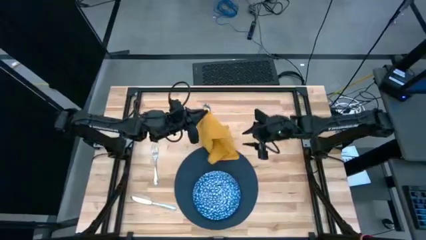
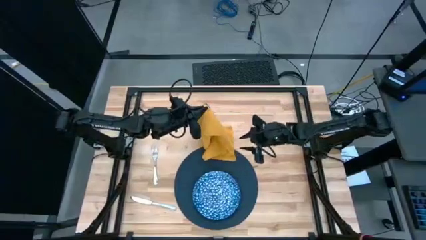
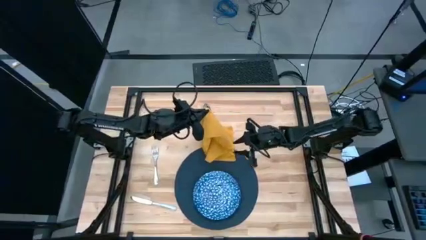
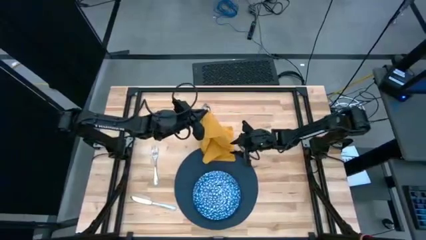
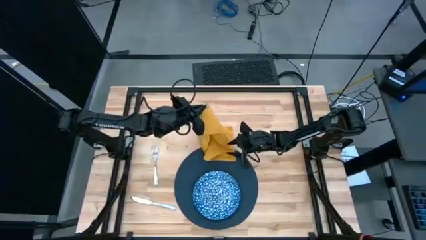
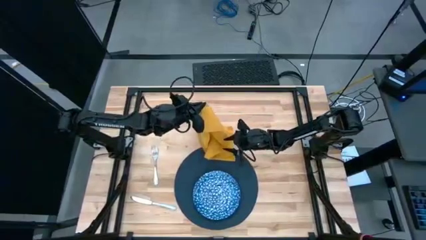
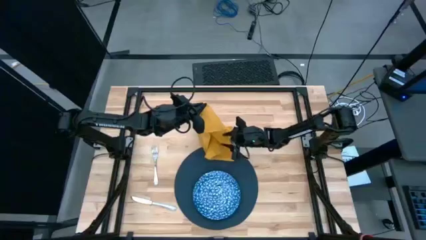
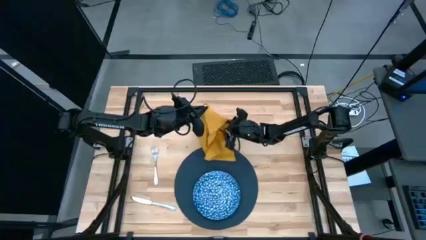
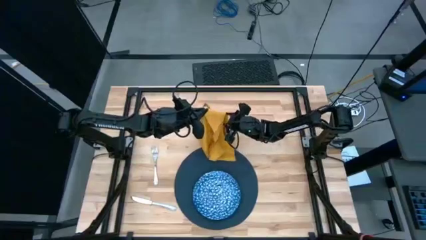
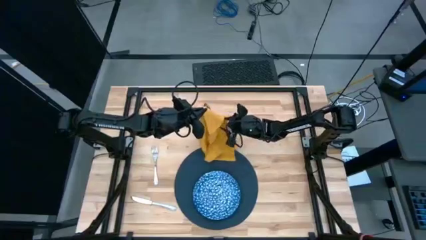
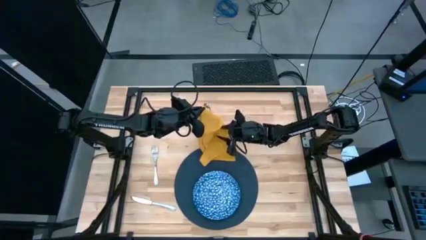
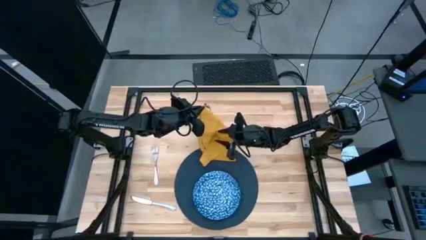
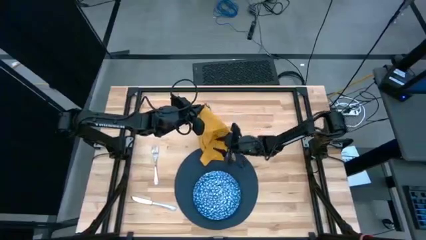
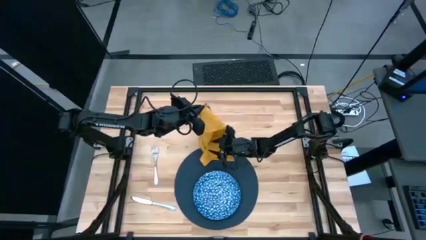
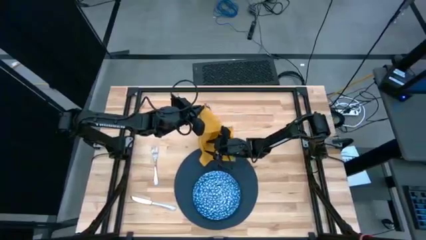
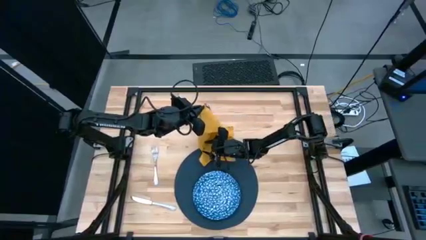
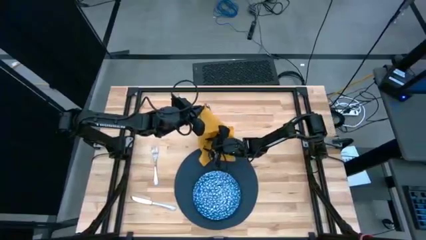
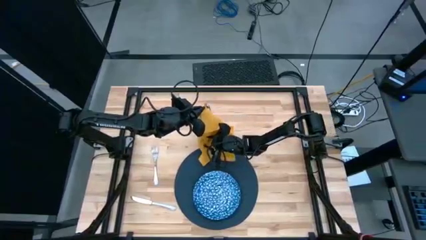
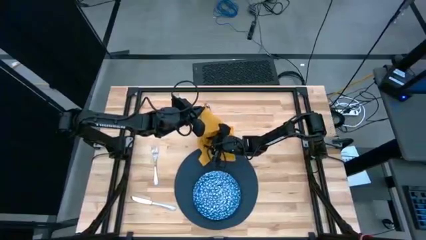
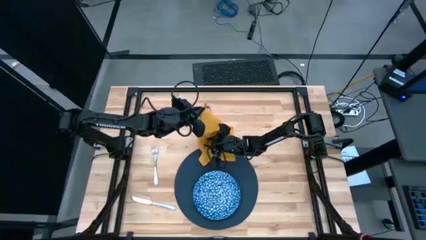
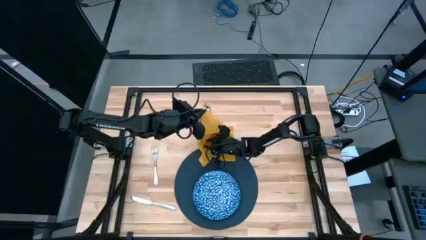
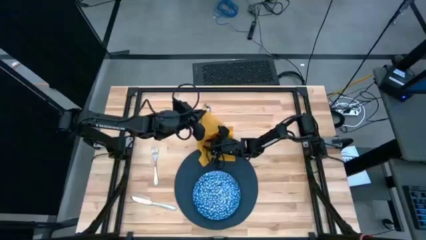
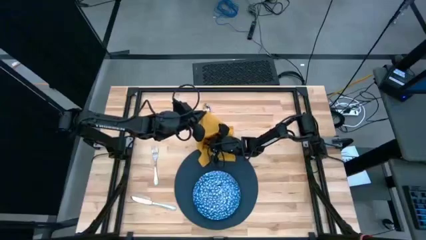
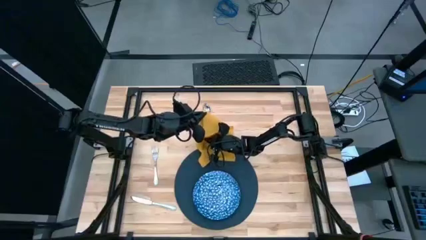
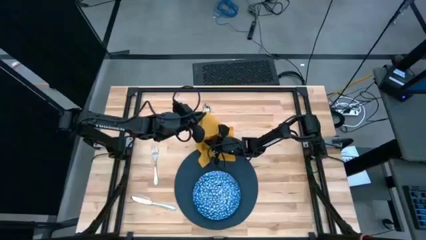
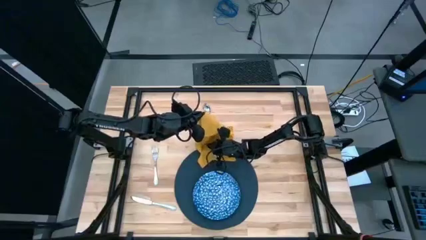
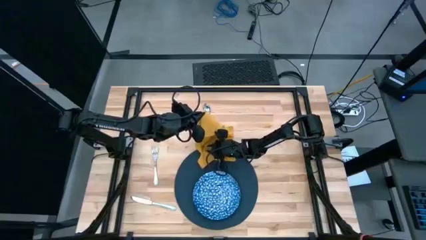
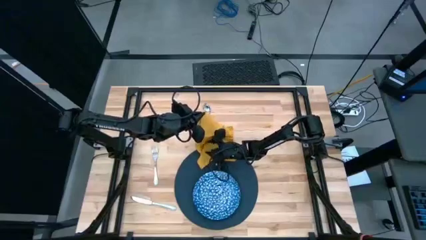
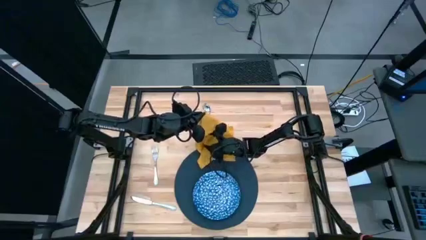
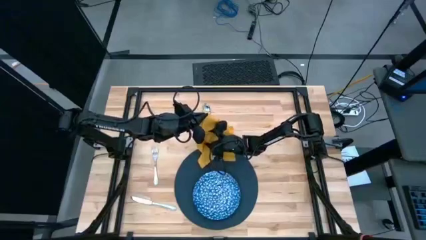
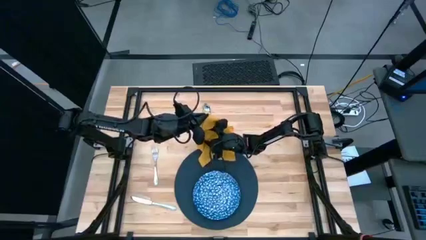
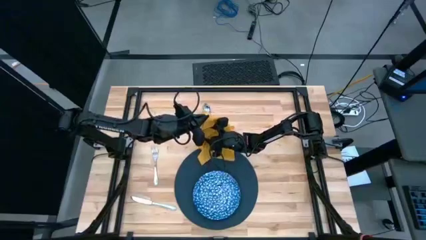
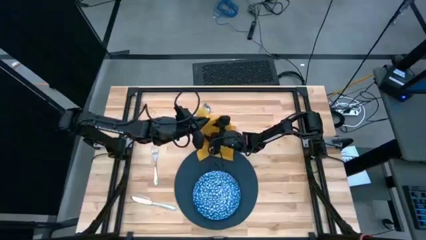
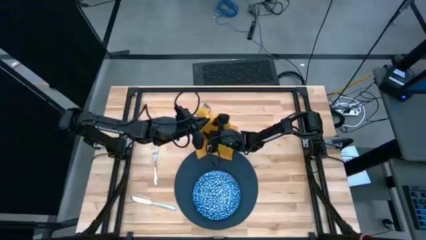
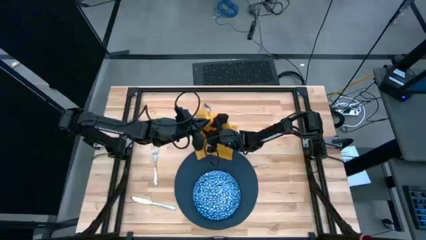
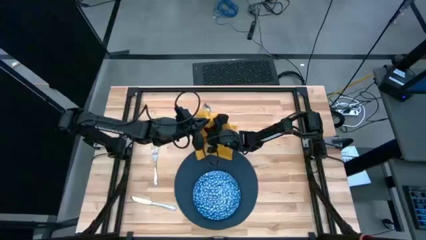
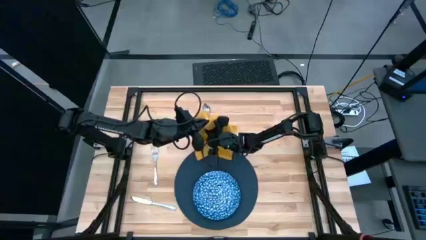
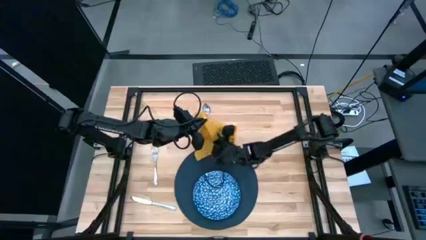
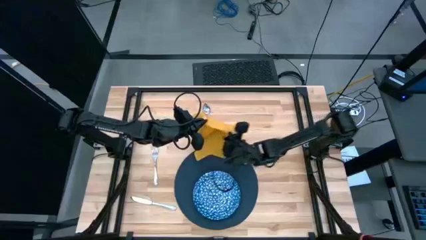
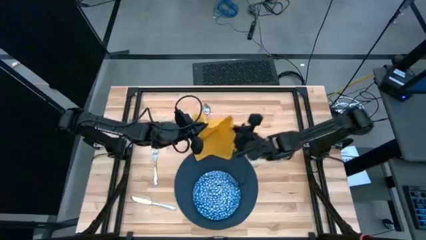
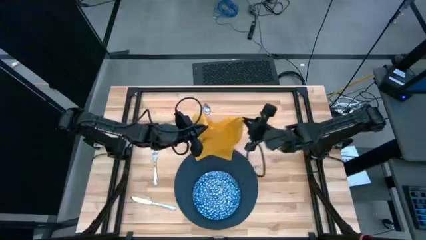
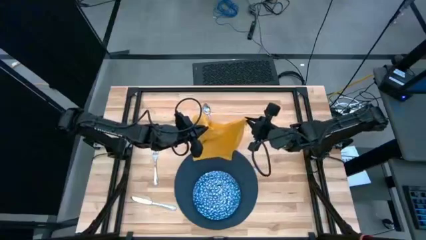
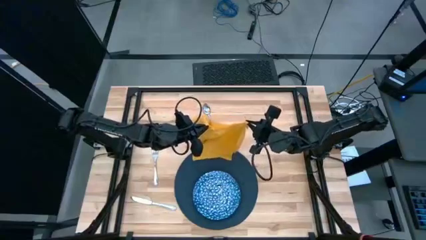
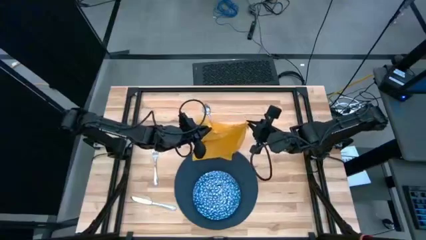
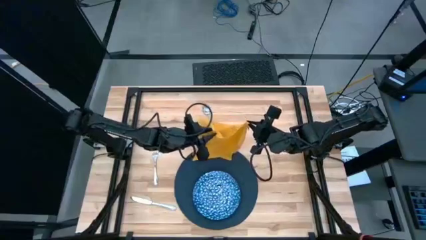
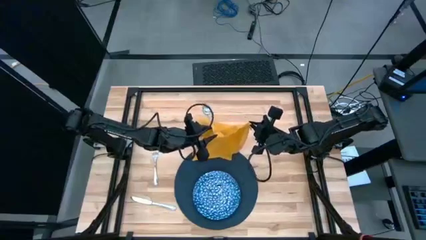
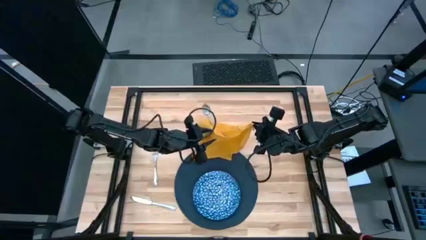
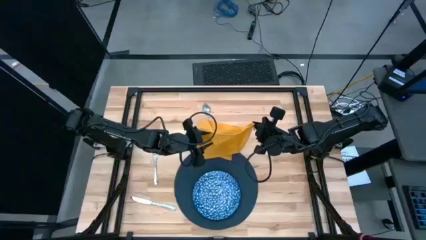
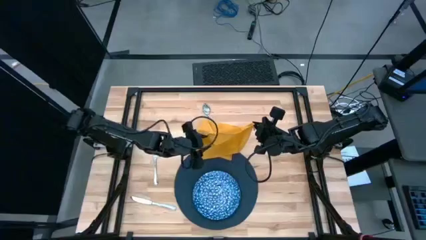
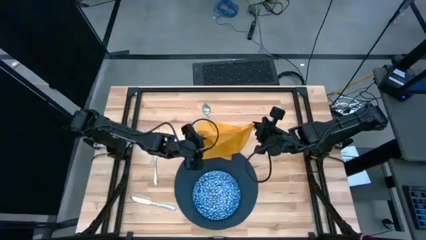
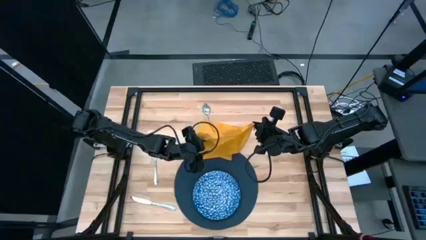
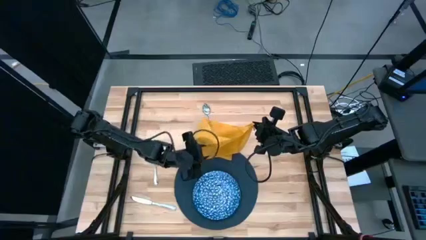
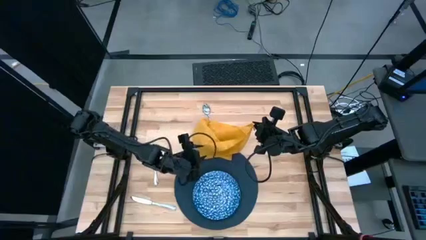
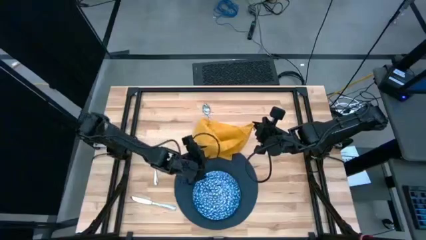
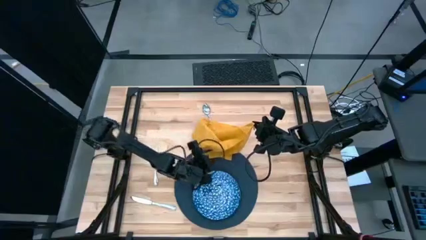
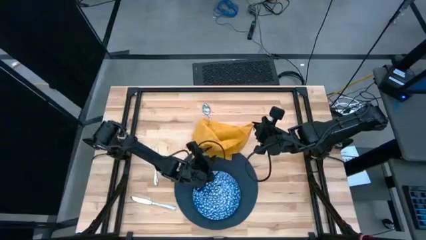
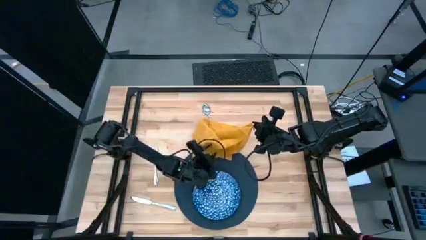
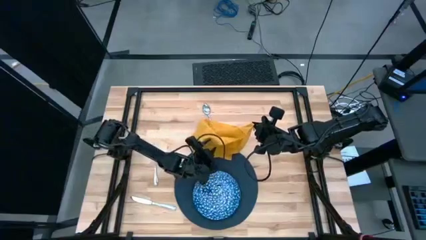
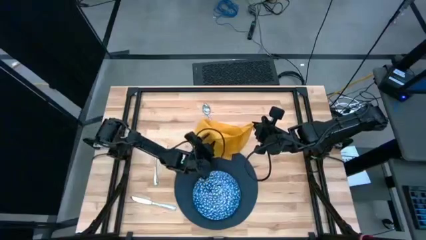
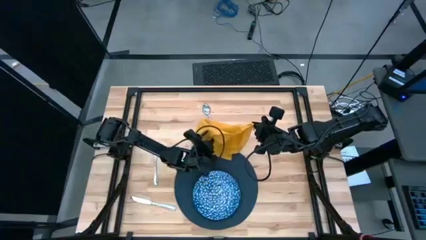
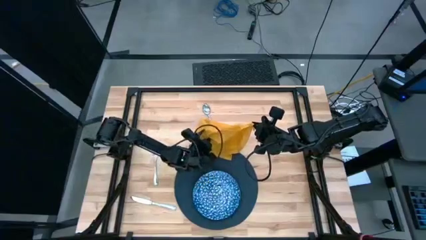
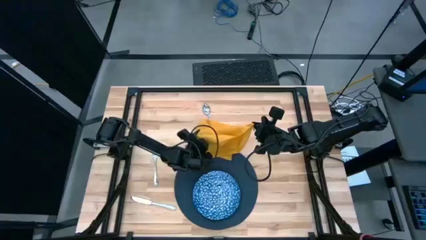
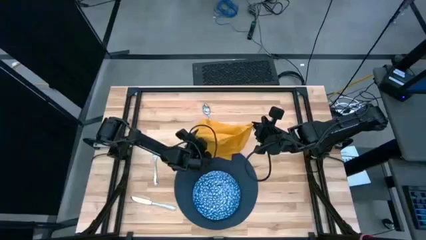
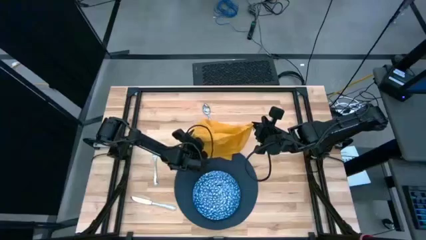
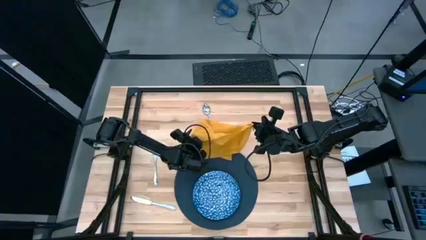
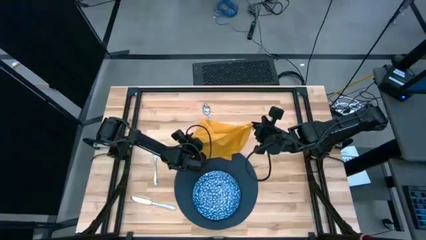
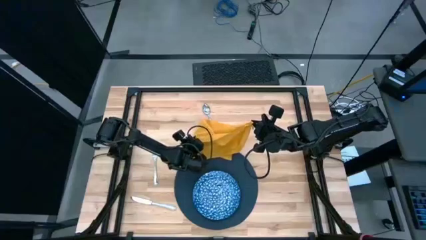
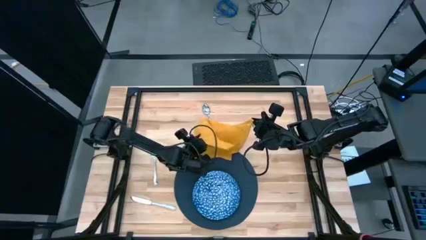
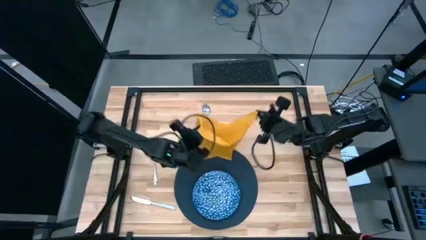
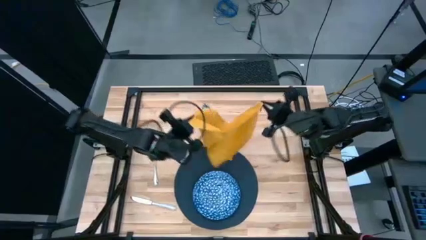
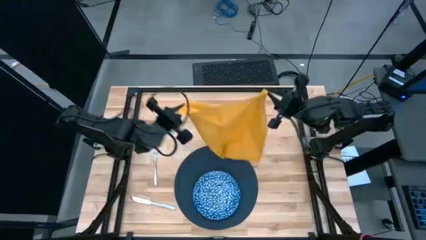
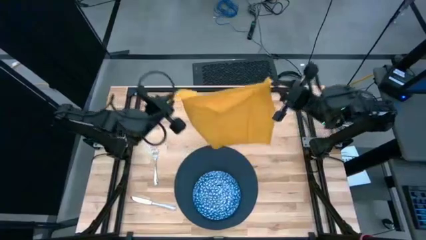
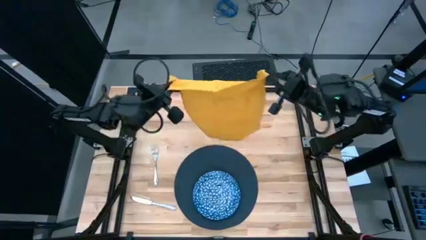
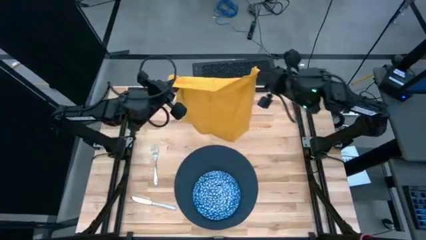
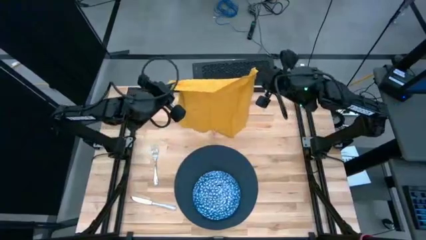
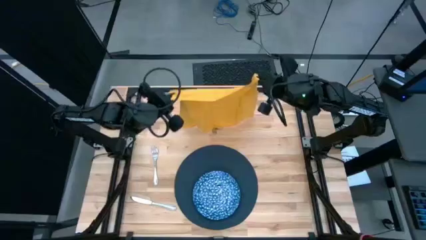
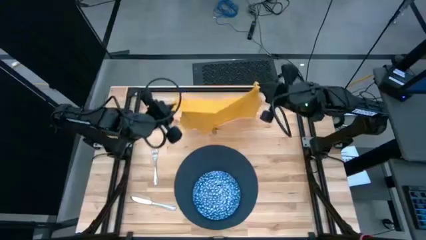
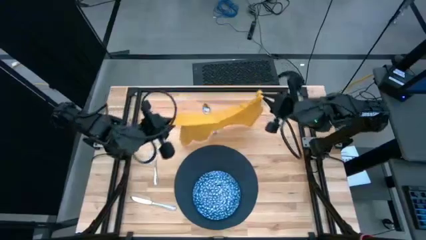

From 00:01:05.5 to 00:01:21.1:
Task: Set table place
Fold the yellow table napkin
